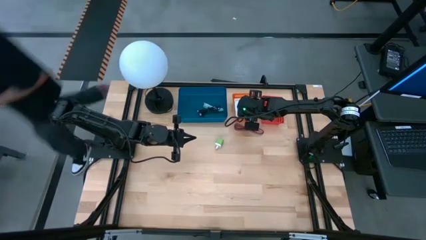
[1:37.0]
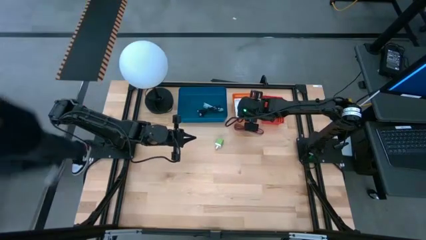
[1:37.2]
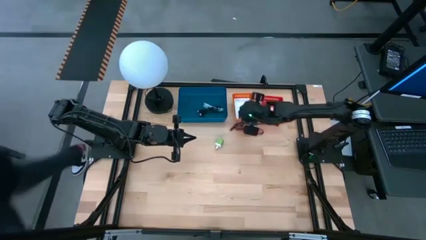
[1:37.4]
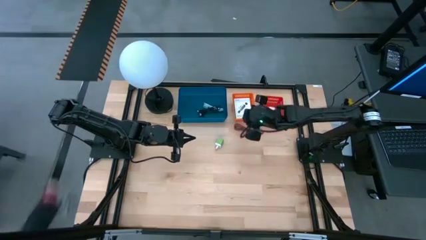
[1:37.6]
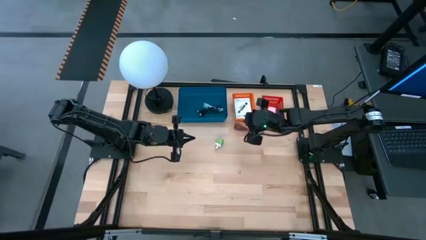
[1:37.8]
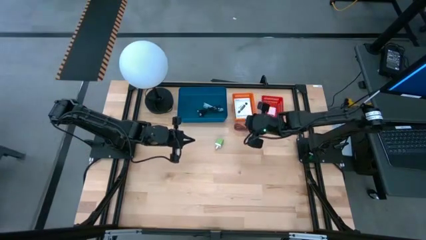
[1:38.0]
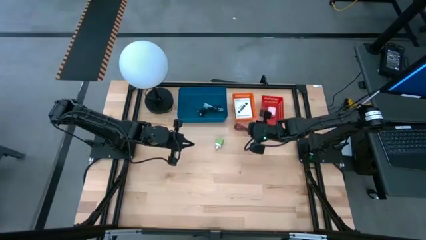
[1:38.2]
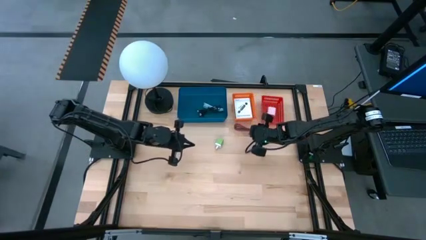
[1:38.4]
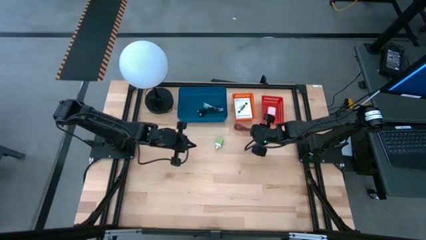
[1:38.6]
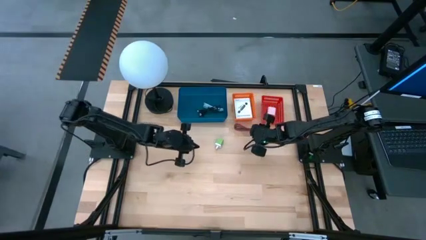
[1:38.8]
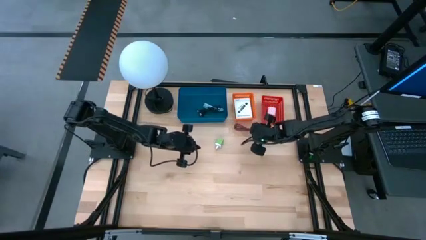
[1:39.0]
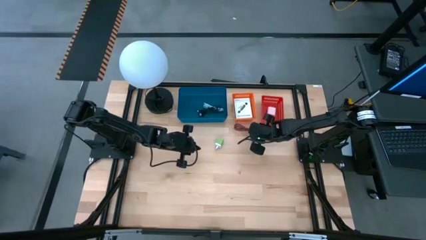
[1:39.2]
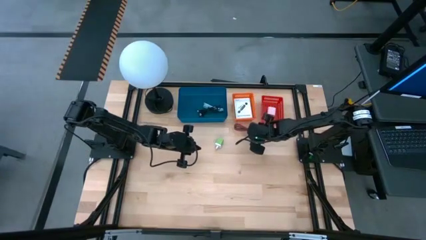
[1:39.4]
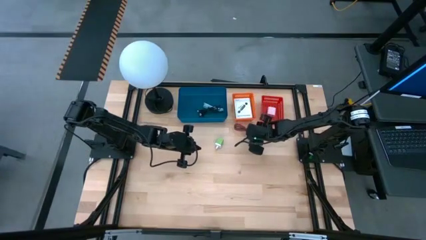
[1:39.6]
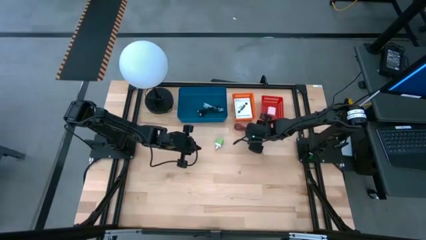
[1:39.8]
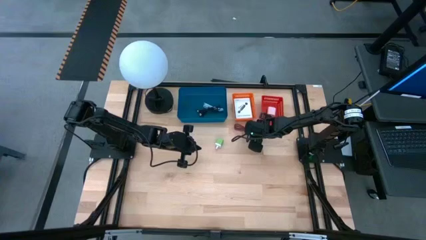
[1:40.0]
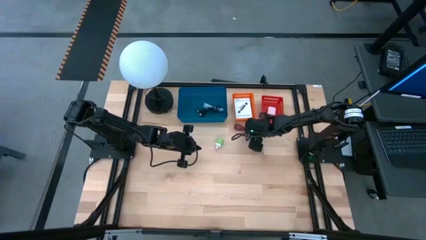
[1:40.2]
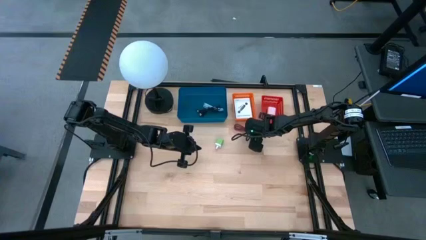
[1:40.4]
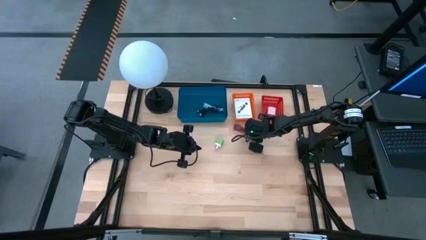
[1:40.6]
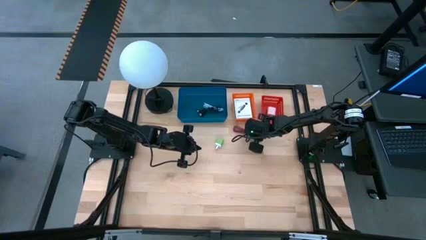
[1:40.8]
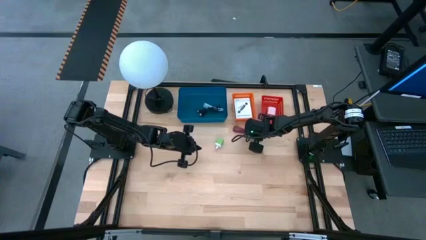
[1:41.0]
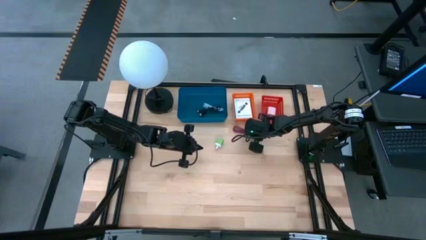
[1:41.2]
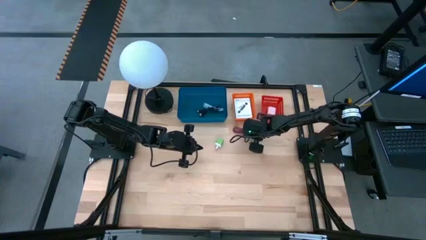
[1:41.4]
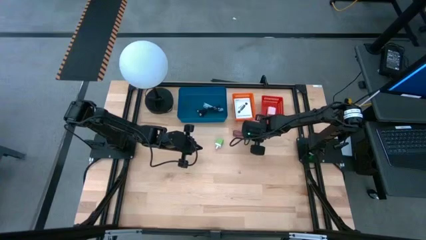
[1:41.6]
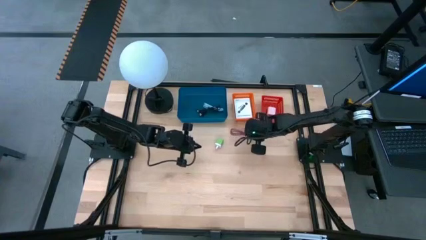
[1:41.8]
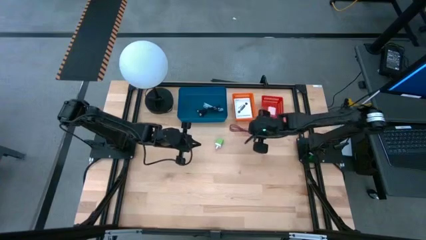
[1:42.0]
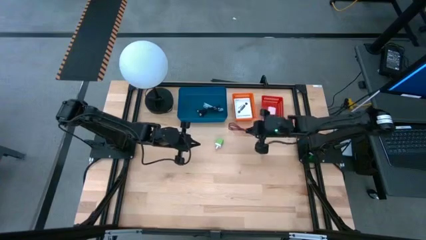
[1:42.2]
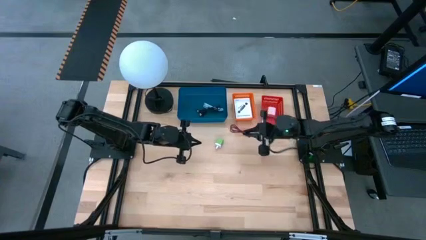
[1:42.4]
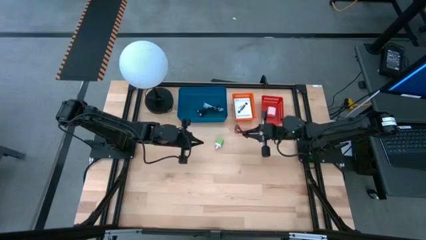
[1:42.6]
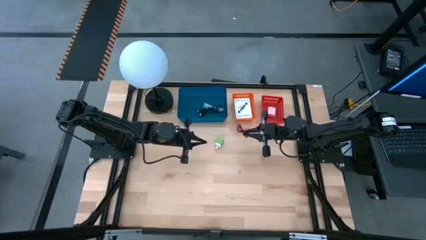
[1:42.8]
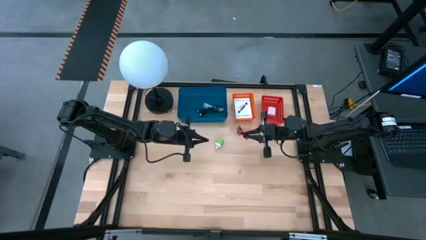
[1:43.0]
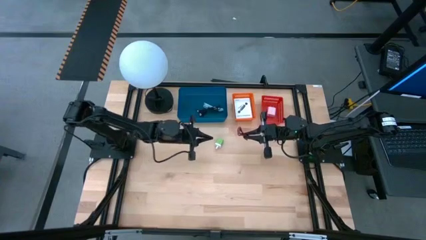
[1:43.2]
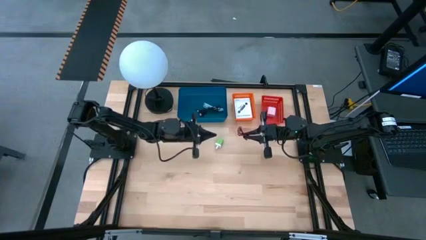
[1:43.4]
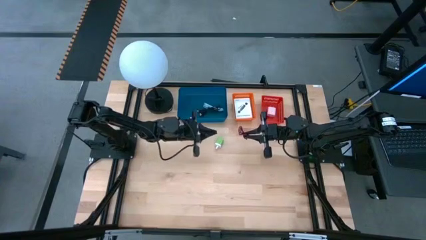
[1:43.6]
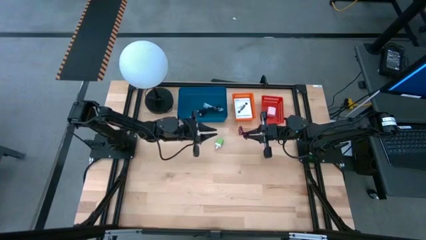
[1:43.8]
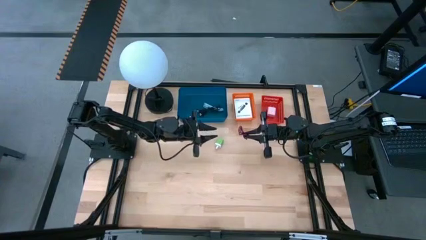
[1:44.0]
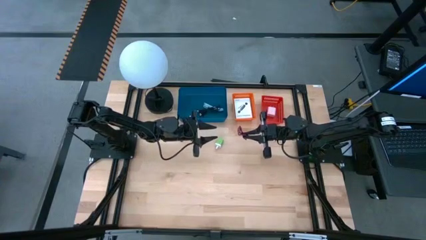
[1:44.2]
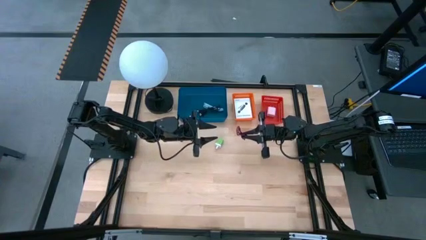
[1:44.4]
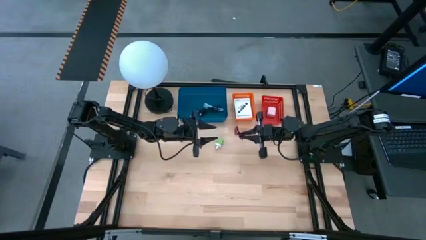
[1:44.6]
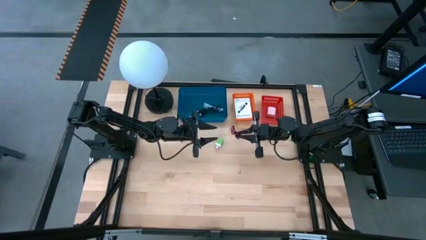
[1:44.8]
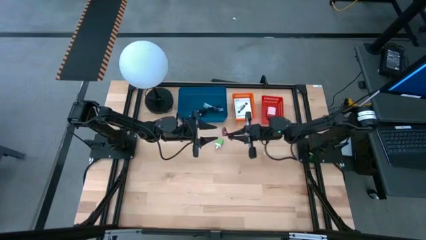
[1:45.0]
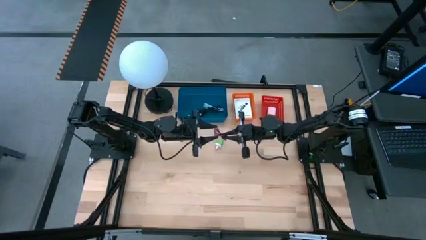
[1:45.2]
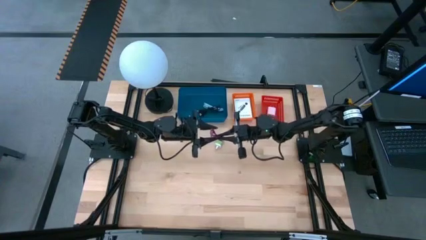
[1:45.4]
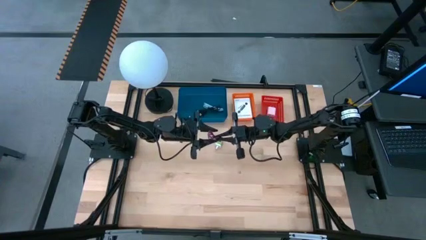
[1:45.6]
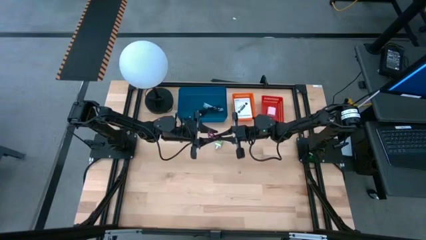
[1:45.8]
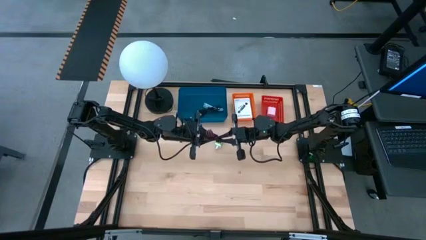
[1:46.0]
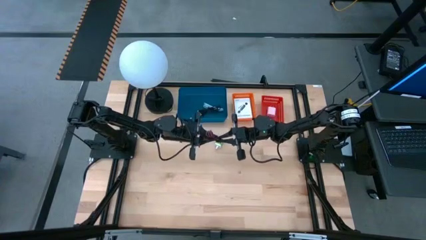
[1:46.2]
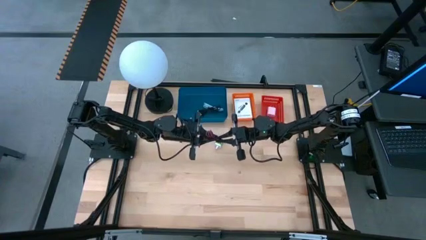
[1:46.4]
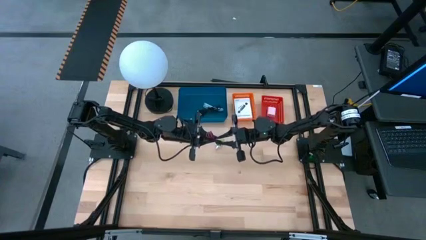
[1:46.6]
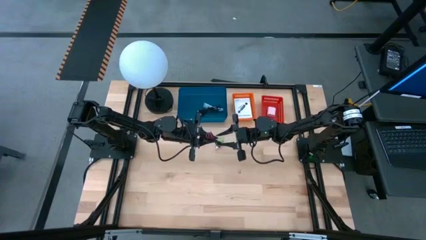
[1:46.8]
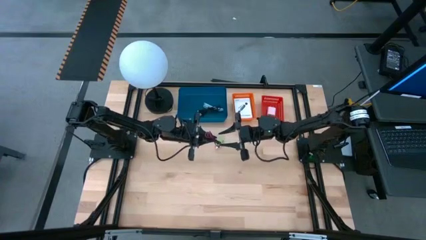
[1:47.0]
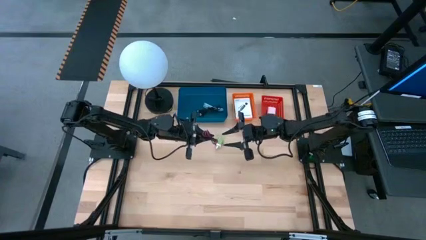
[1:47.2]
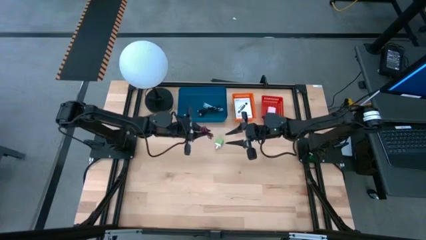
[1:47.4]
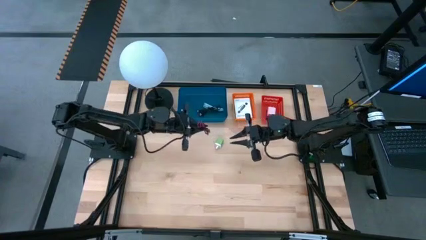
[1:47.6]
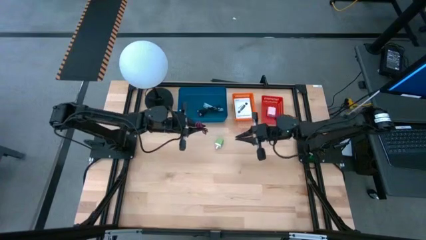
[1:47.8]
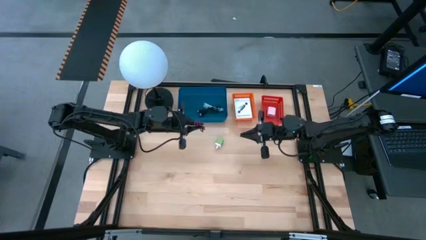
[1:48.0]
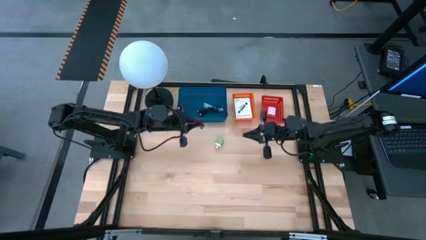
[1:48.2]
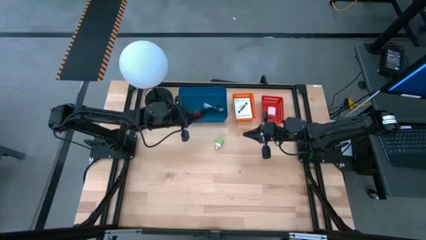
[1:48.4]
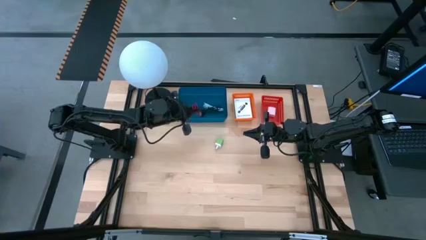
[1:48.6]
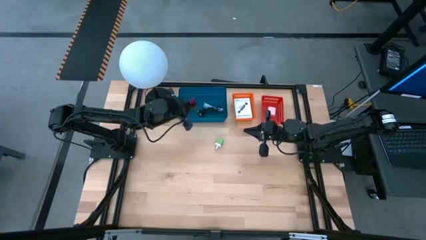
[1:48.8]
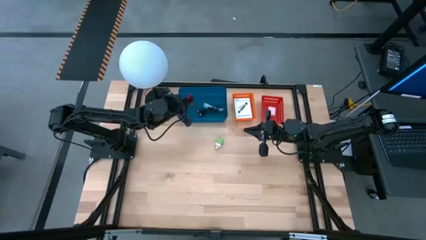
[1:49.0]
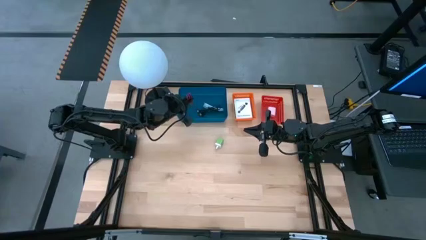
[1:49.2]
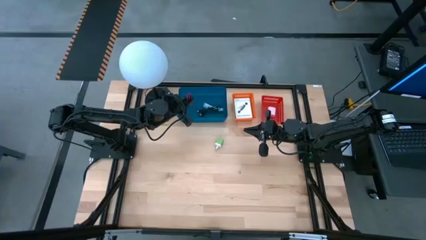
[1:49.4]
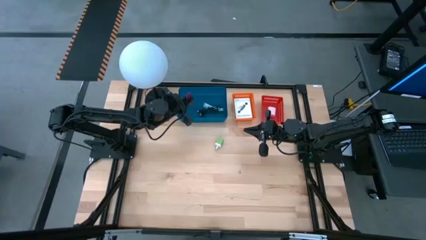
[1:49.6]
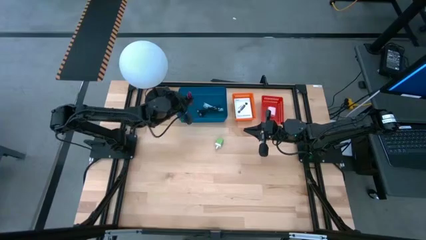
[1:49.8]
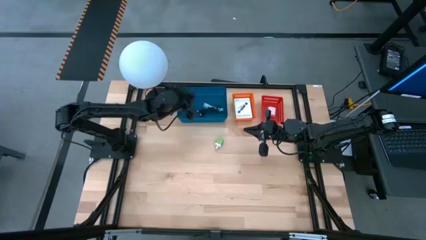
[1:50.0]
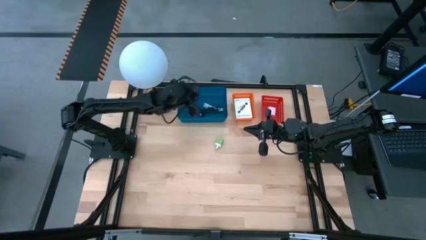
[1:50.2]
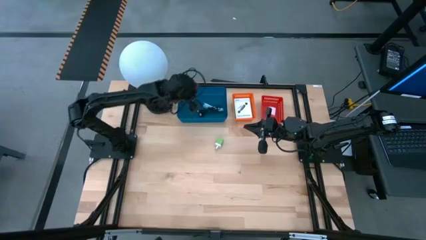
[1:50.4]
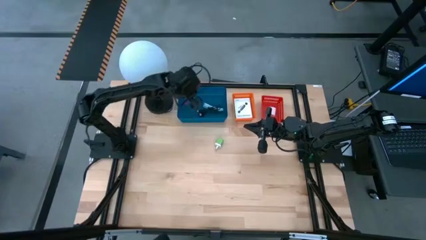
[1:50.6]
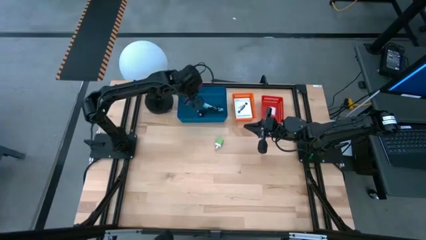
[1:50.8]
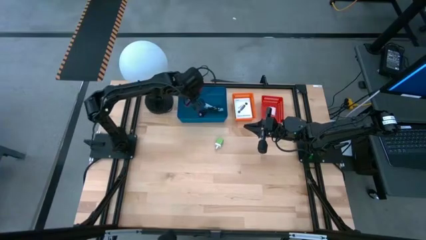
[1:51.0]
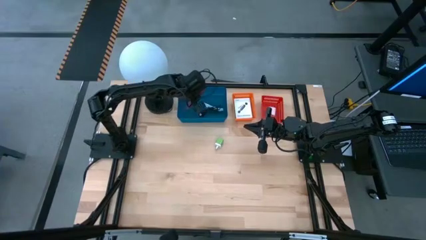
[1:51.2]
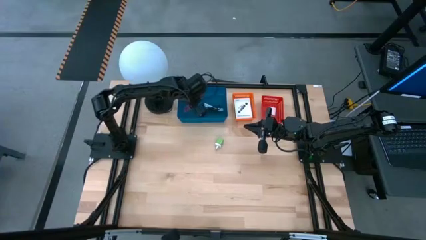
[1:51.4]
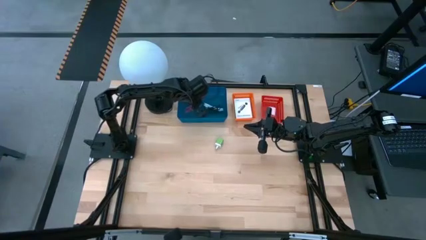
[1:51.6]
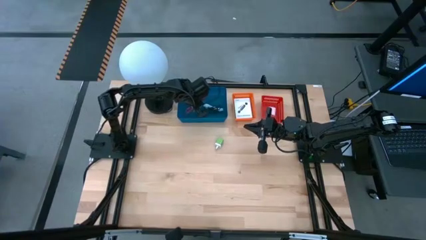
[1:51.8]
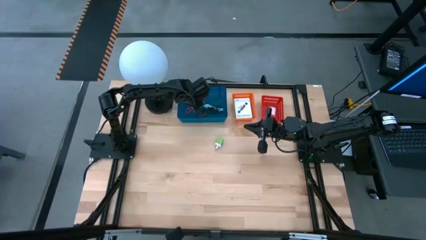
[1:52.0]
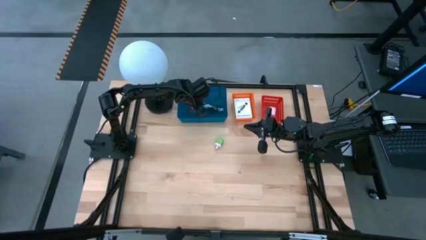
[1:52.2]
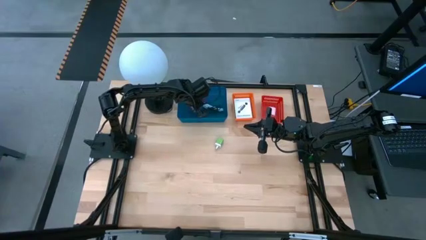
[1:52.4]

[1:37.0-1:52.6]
Task: Pick and place items into bin
Put the pink charger cable into the blue bin
